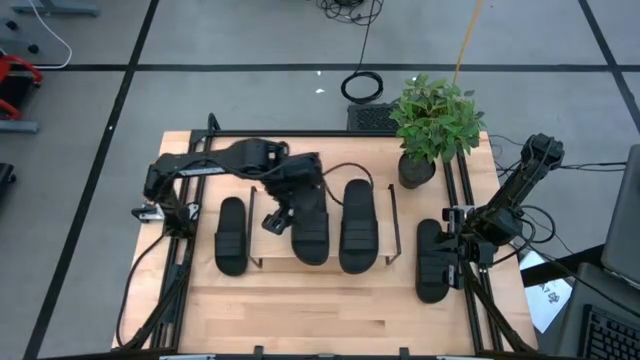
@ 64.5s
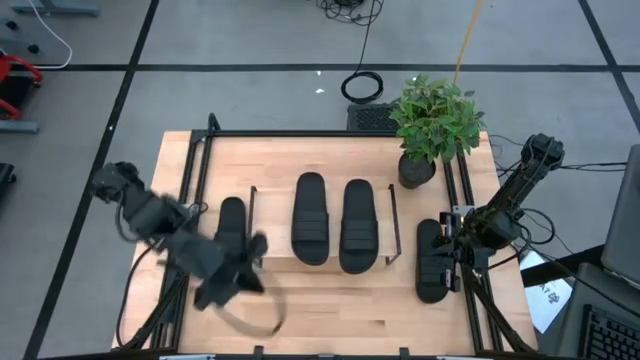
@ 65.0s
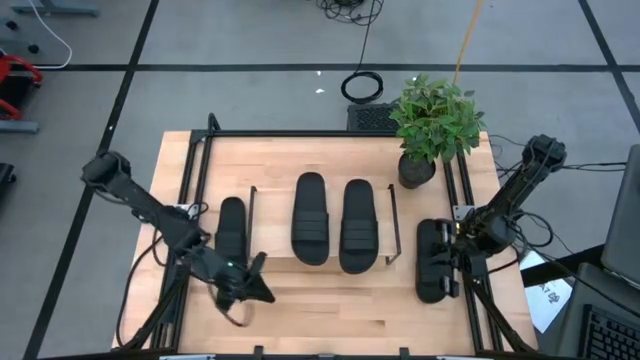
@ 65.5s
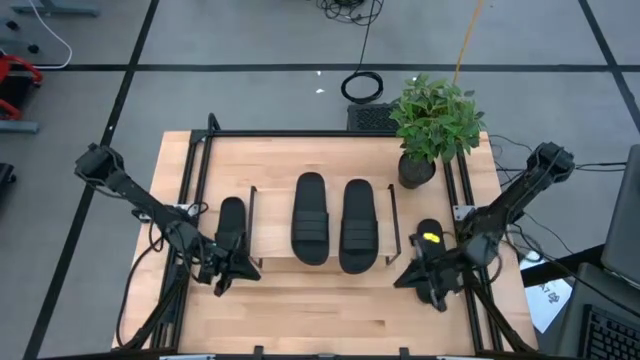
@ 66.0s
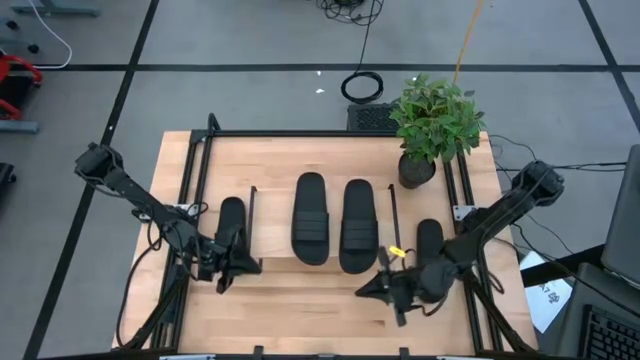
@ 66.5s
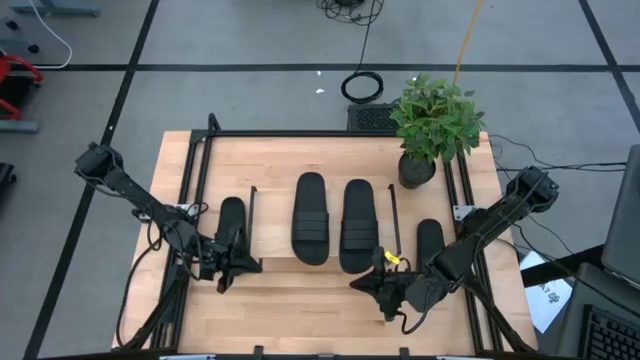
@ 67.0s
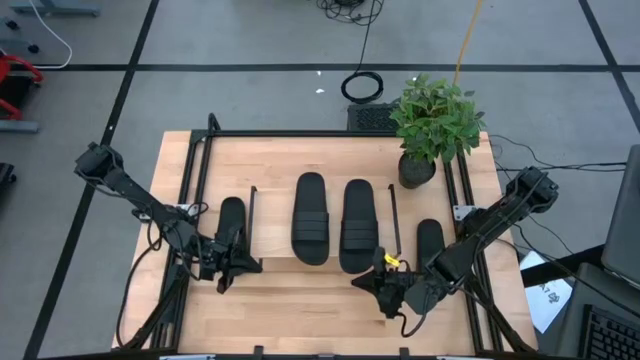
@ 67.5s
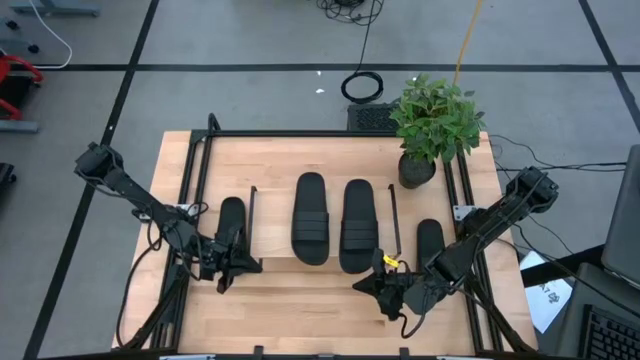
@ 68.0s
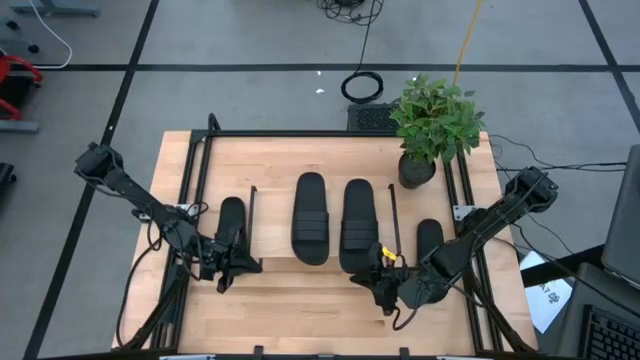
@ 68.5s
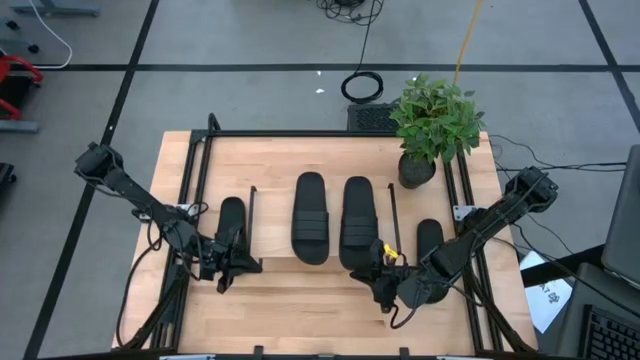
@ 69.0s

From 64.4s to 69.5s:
Task: Pick and place slides into the shelf
Adjust the right black slide on the shelf

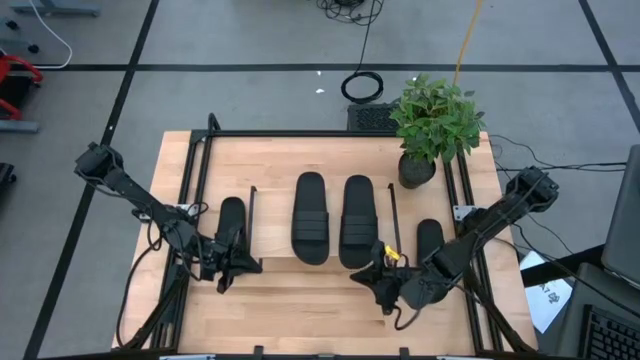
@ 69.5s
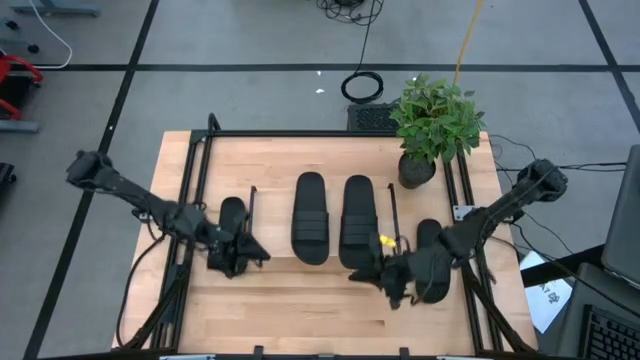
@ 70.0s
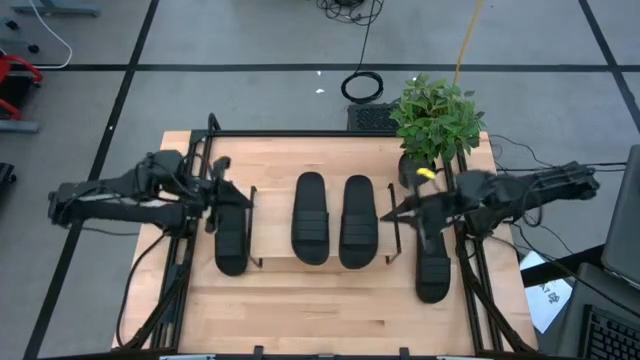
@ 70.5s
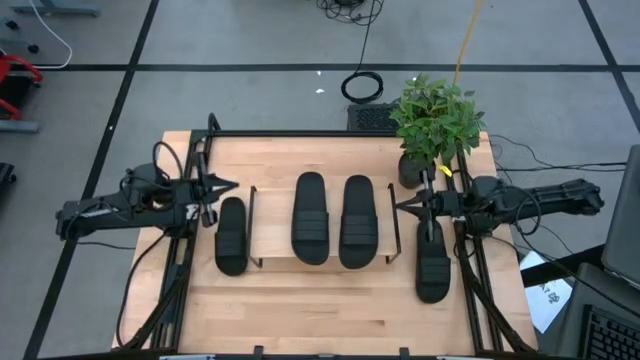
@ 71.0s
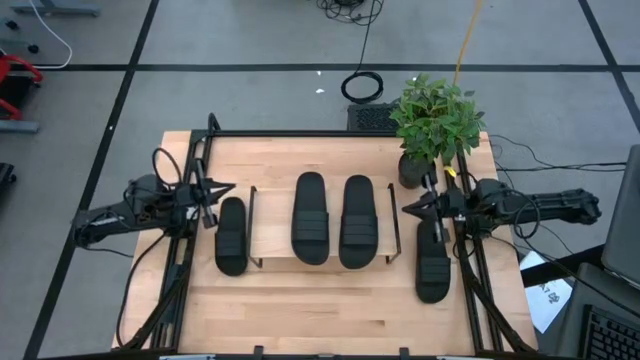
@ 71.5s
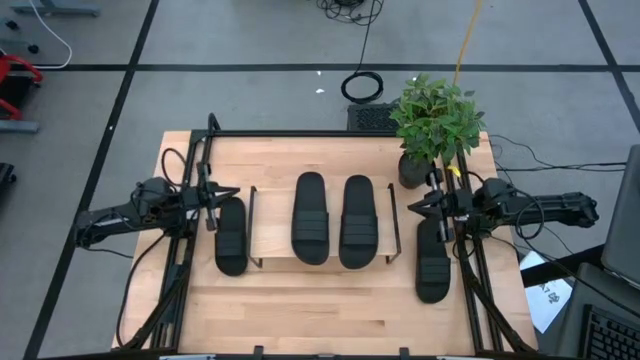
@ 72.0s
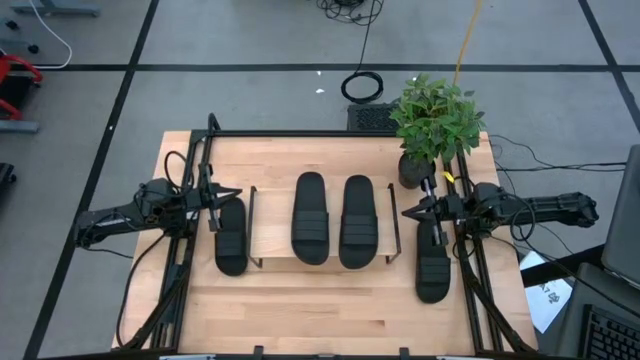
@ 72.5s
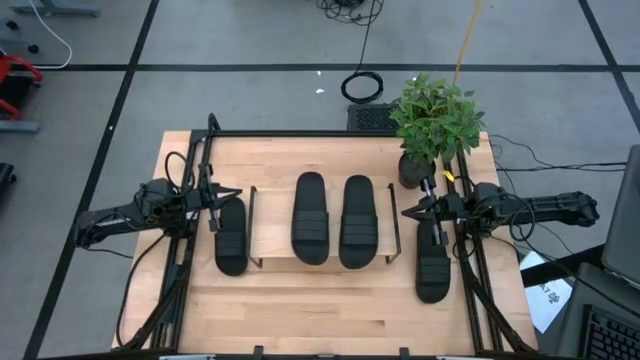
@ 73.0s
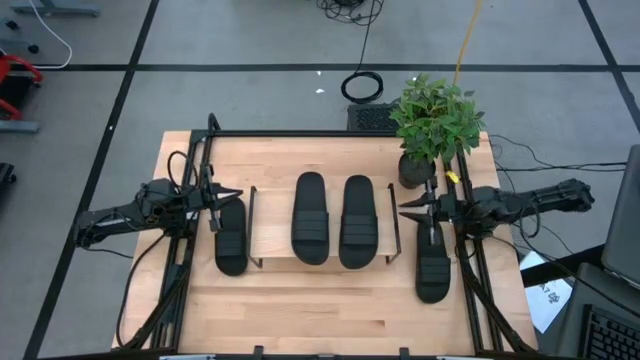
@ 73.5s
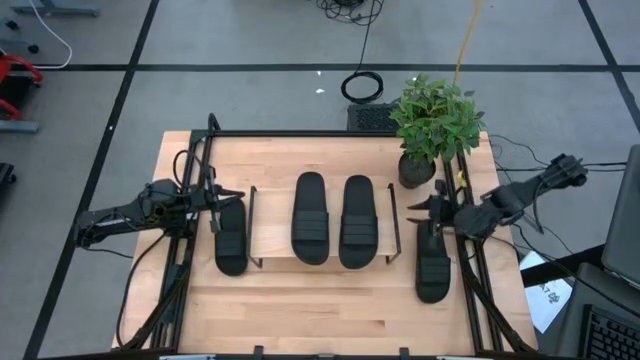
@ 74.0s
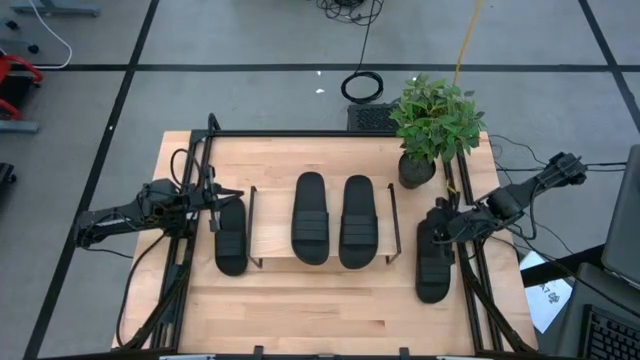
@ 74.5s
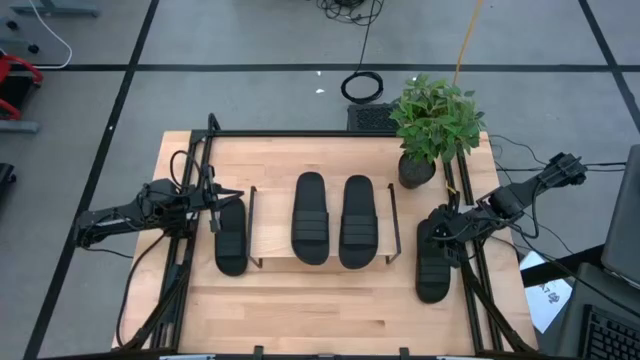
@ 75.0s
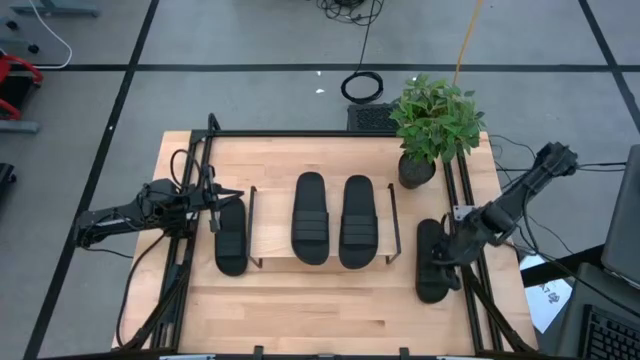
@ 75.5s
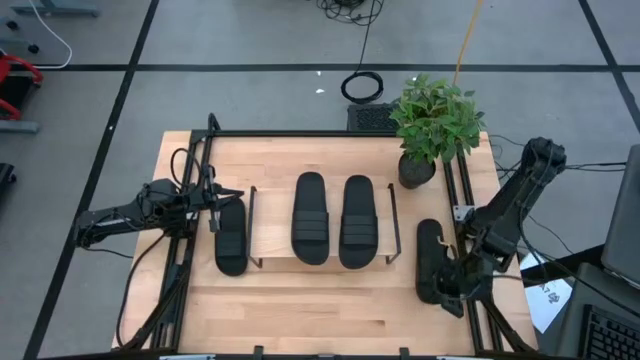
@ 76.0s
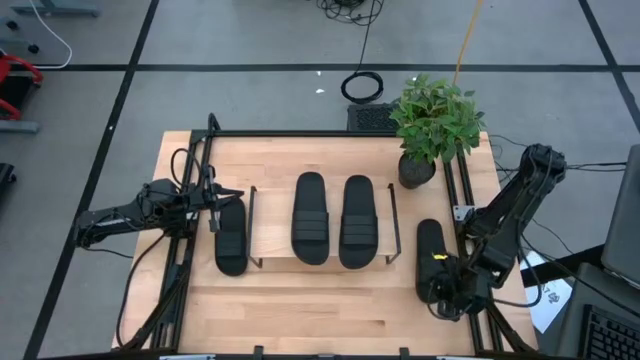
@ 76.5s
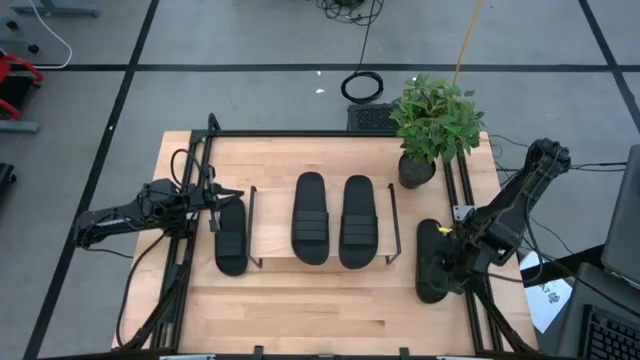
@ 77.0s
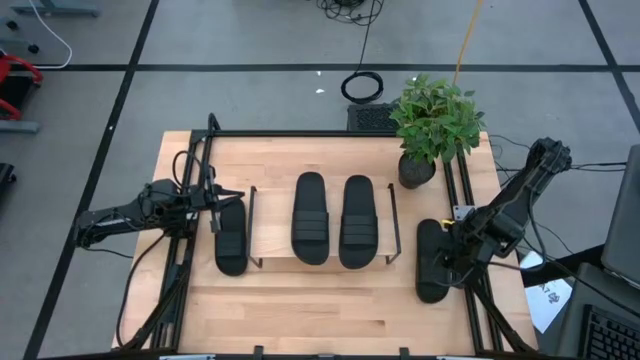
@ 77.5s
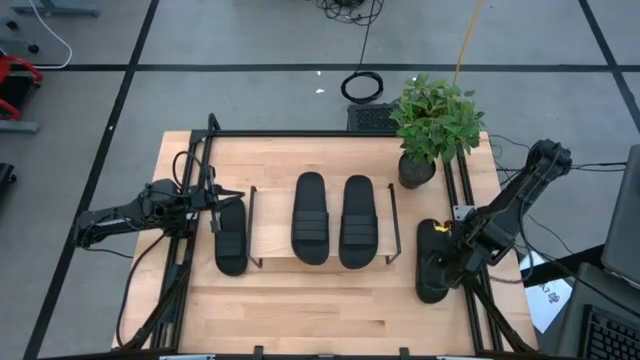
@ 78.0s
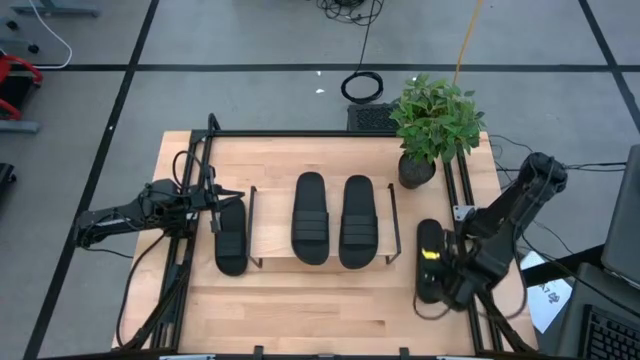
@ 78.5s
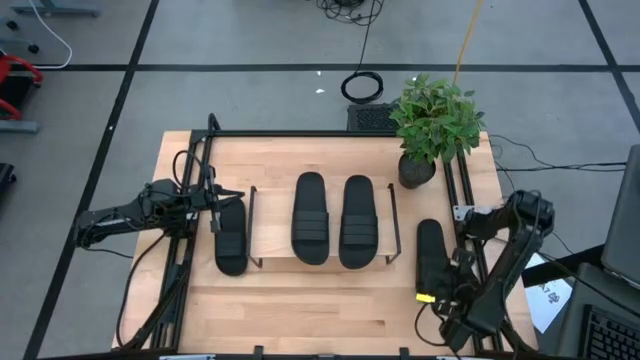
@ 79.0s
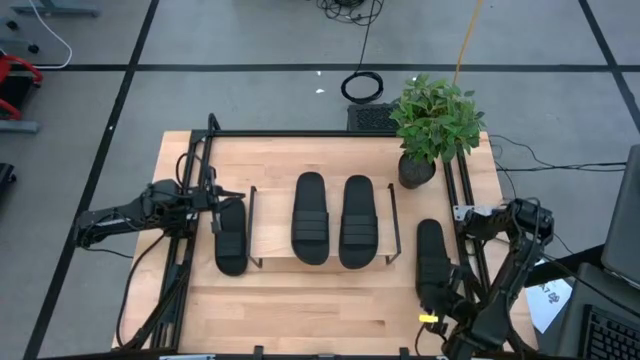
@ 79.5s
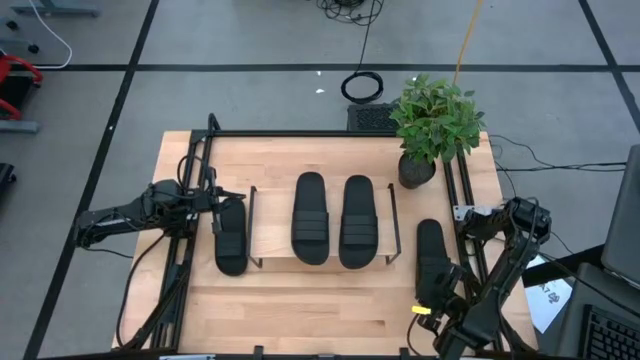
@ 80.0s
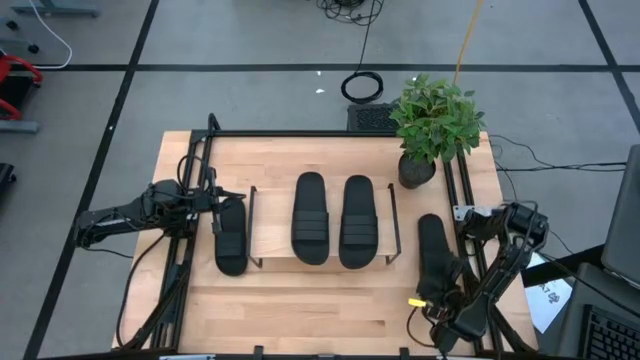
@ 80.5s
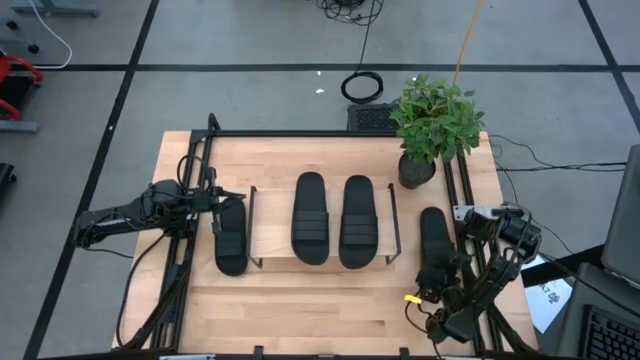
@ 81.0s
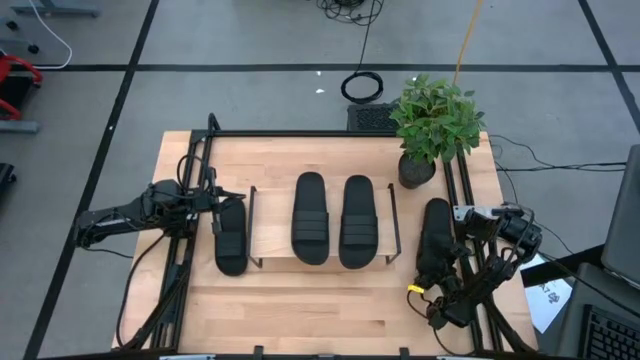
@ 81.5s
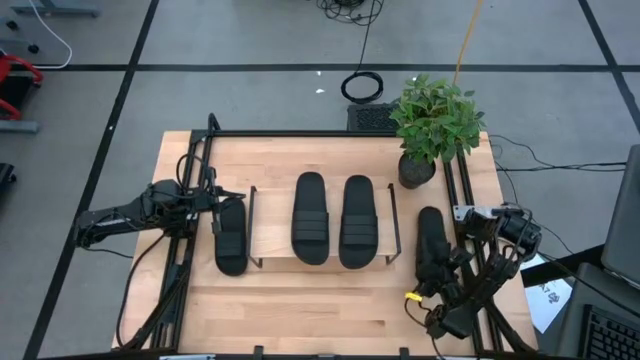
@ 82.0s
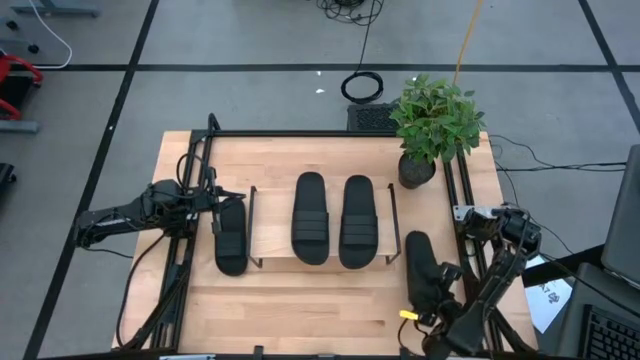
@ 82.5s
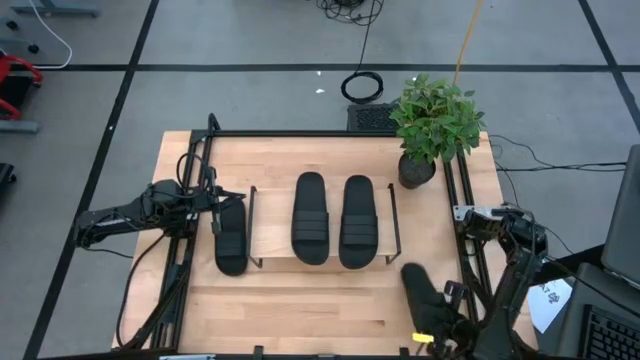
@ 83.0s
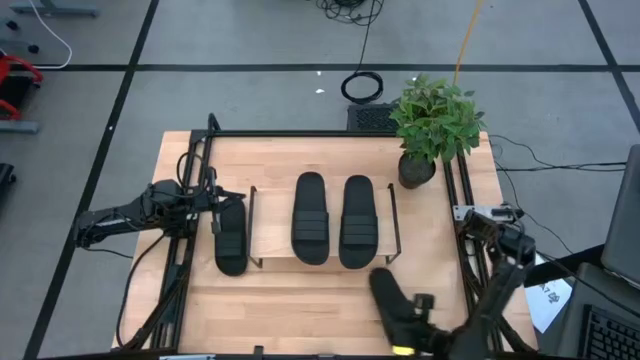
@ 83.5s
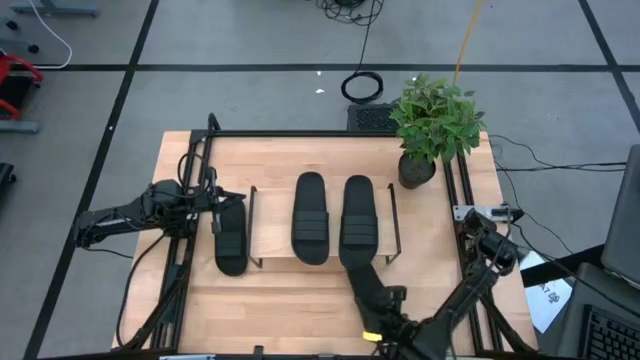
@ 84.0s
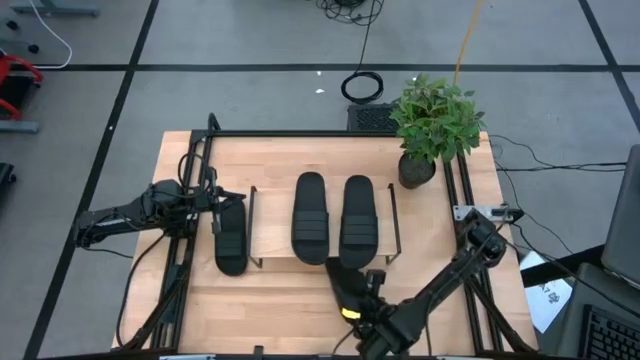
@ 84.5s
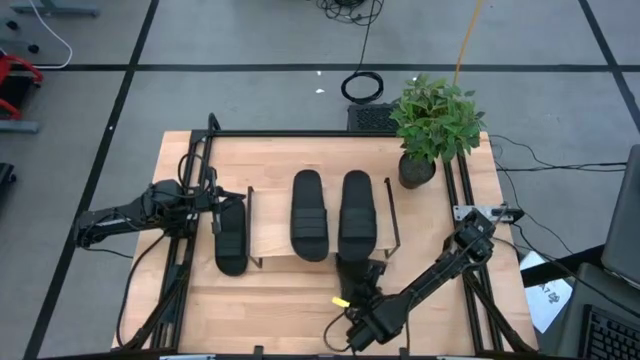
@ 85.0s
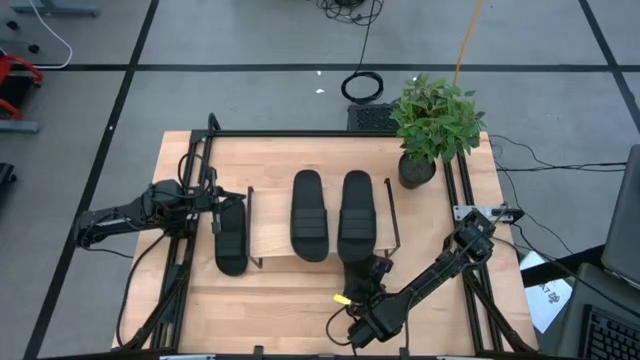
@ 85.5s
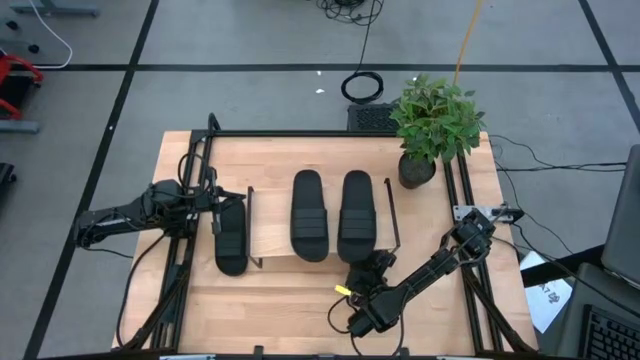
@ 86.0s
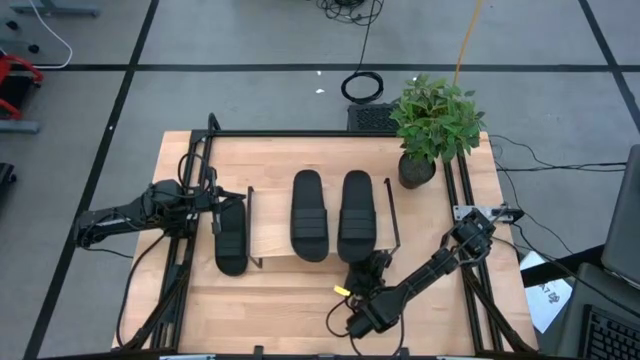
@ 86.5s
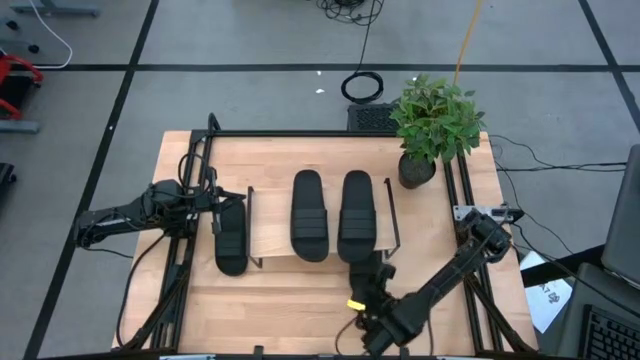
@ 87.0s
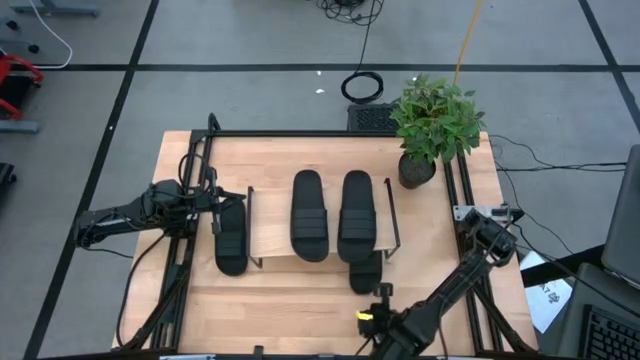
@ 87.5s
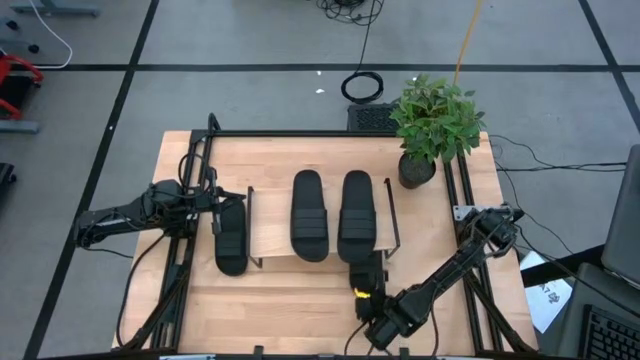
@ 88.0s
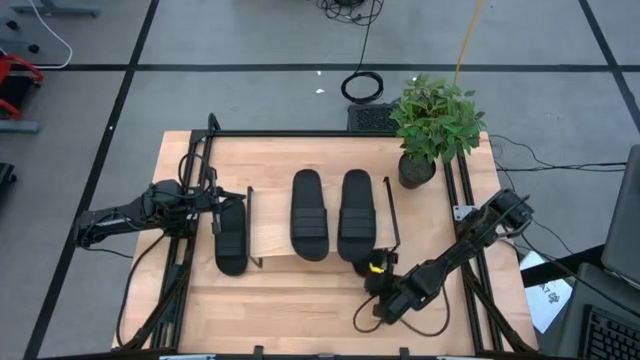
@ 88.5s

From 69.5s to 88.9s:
Put the right black slide under the shelf
